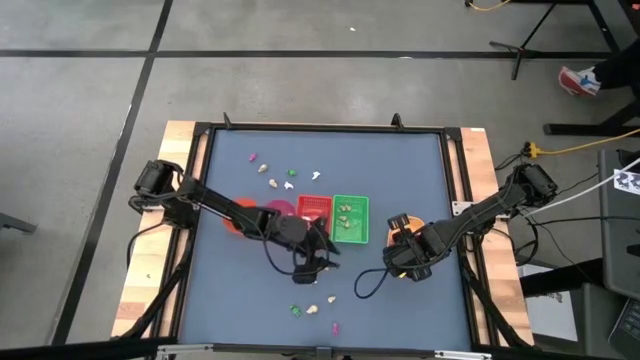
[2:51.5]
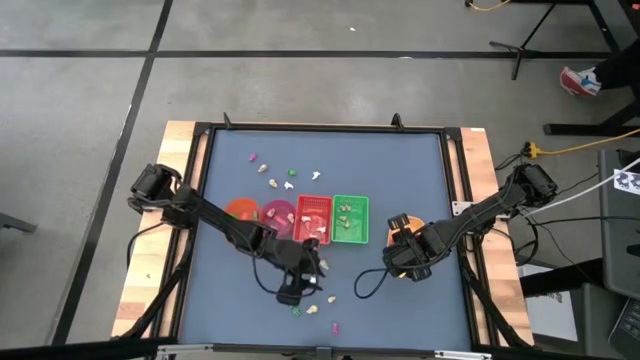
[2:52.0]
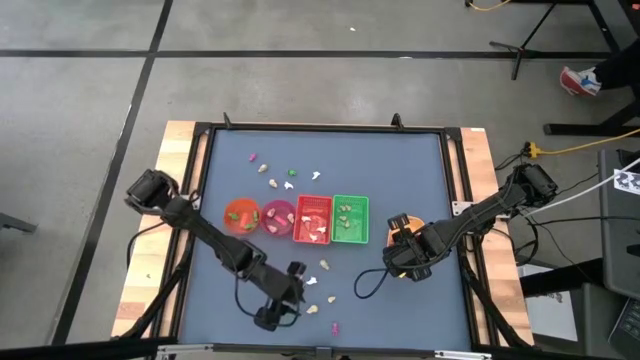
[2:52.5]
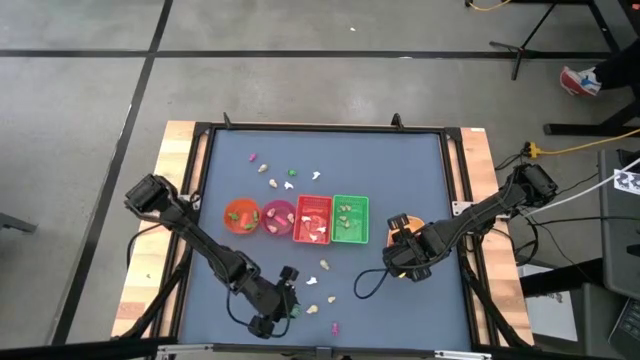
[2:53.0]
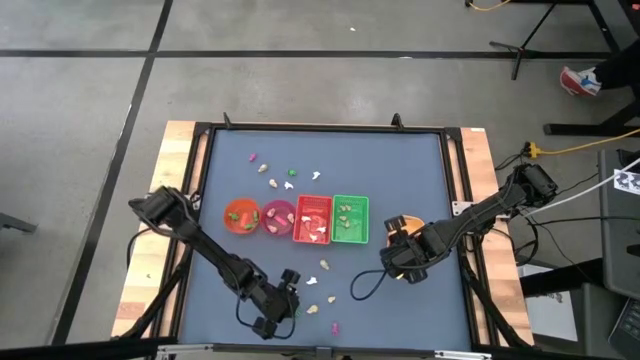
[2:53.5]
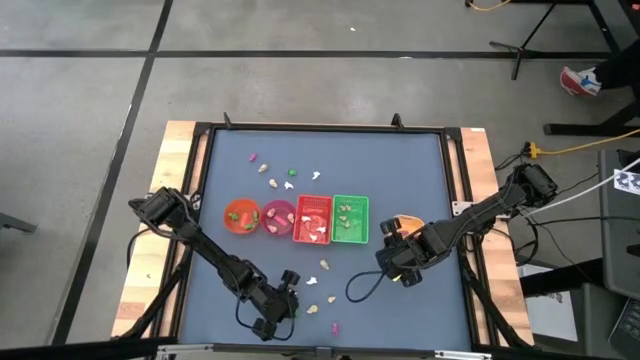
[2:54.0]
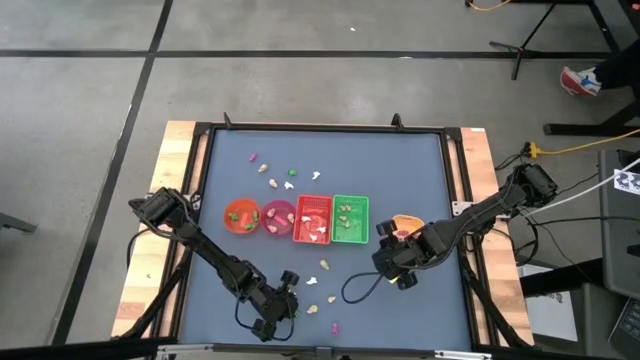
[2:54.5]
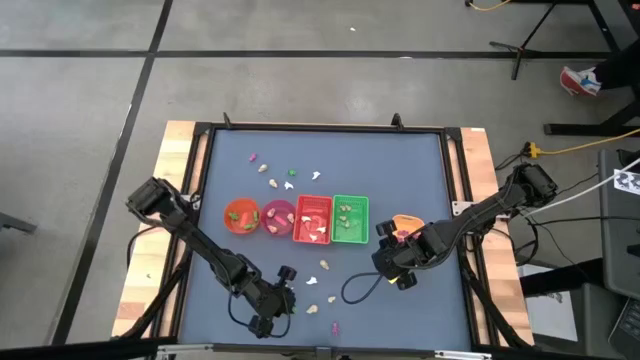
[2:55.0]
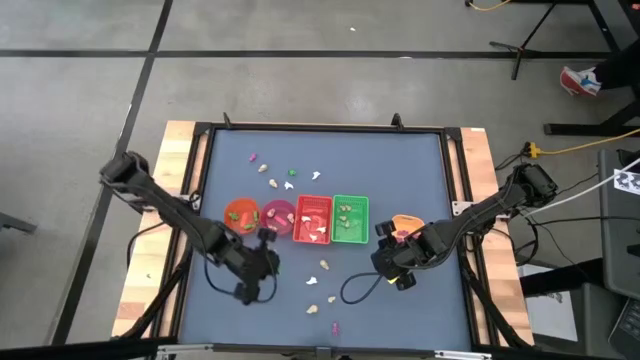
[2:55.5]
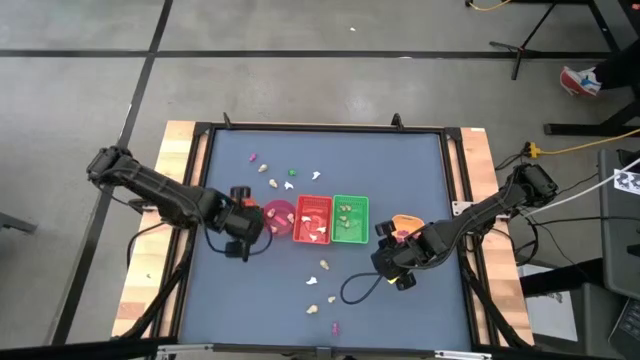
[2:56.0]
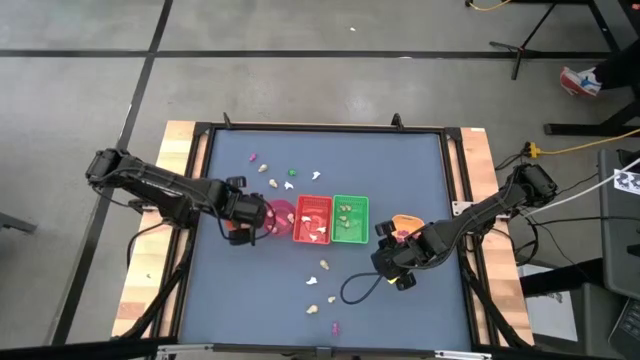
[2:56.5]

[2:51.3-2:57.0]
Task: Sort Halloween decoration
Put the green skeleton toy into the orange bowl

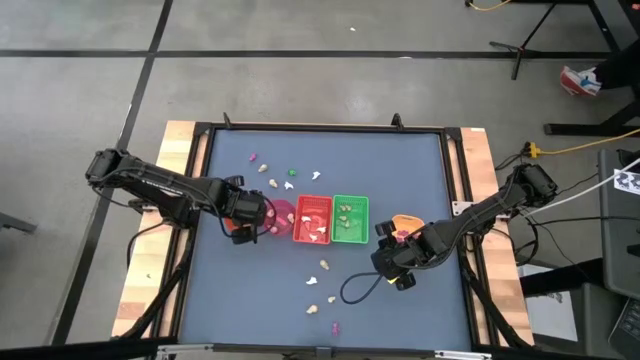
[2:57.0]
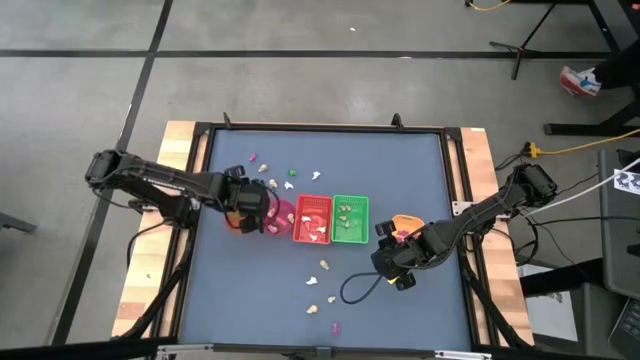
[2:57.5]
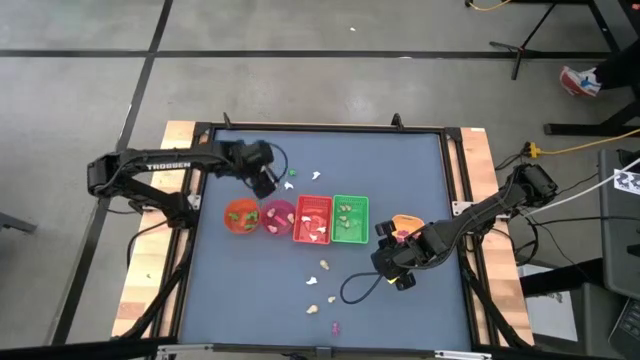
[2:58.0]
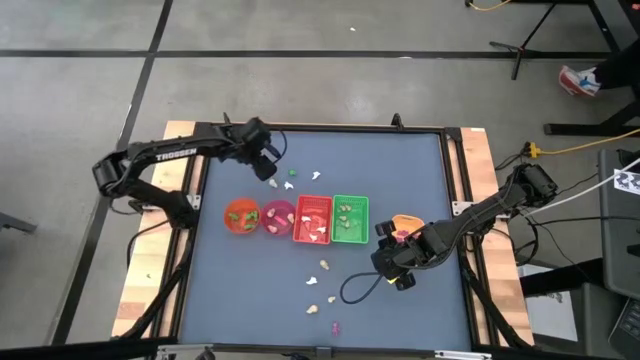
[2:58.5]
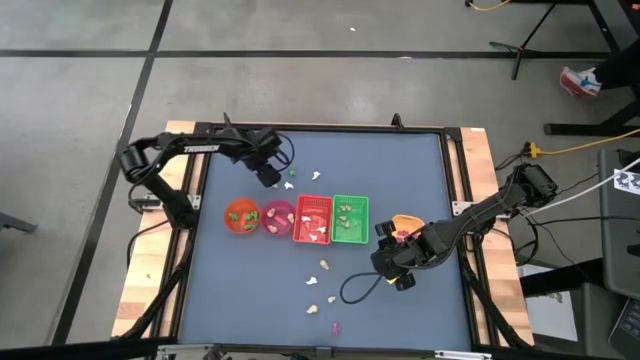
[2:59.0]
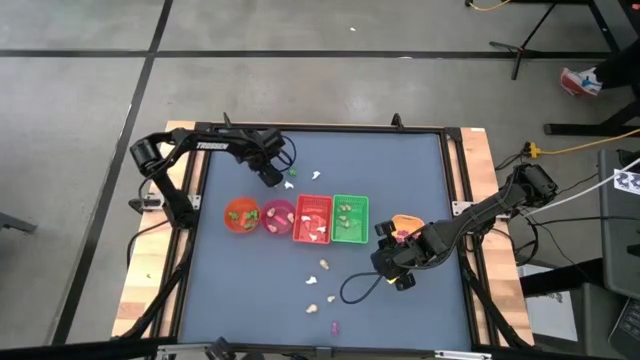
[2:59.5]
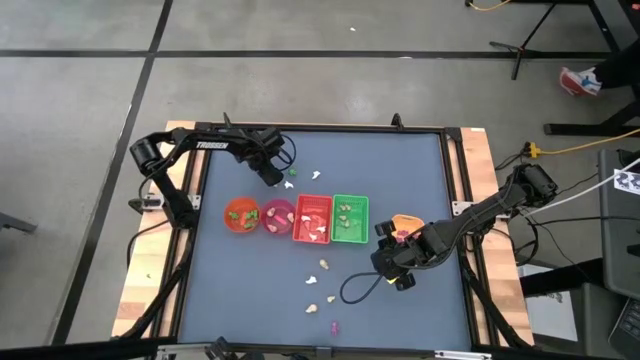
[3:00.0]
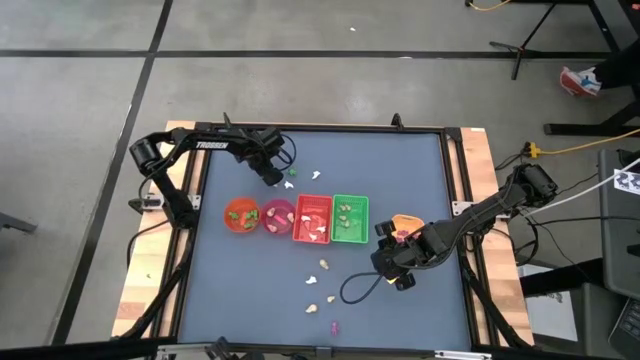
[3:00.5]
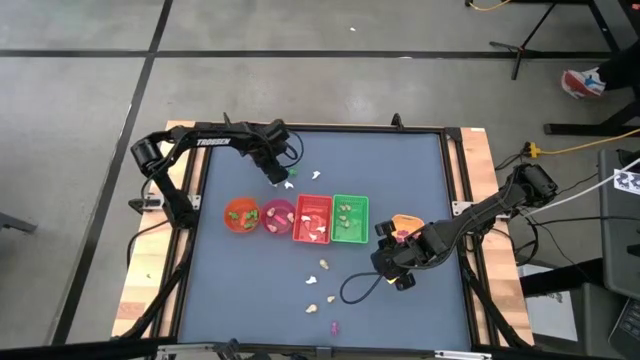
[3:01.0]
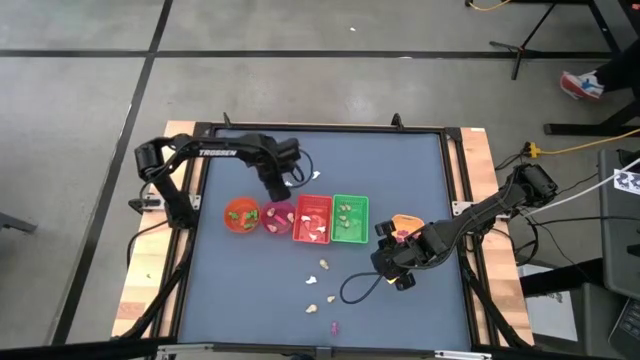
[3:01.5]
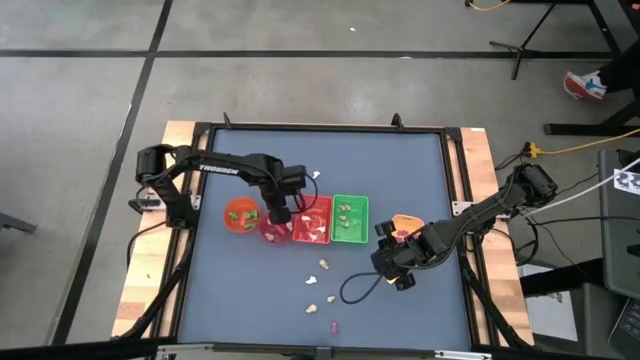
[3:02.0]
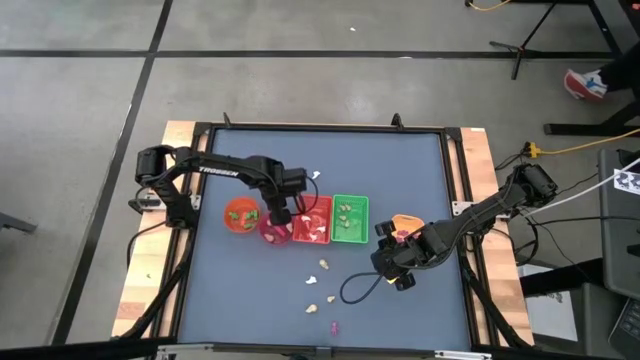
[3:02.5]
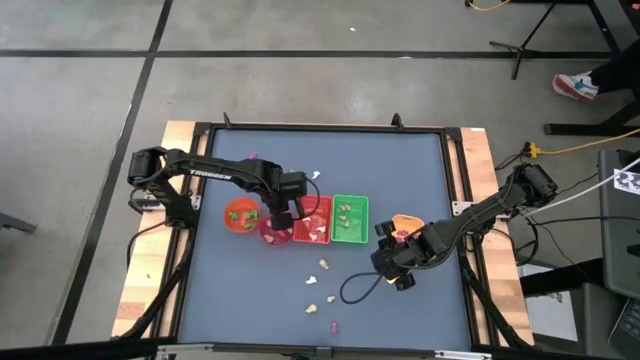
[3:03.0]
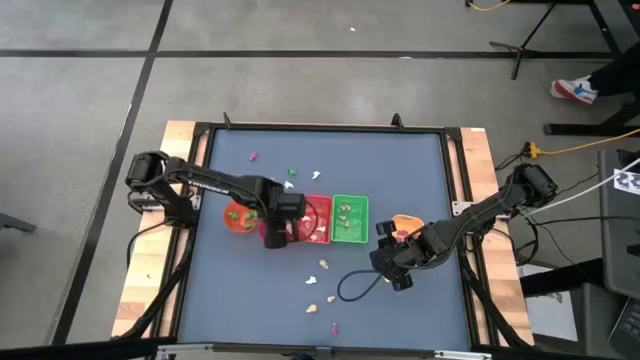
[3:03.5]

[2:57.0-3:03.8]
Put the yellow skull toy into the pink bowl

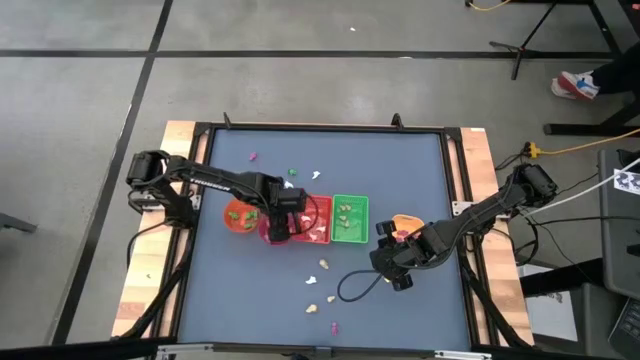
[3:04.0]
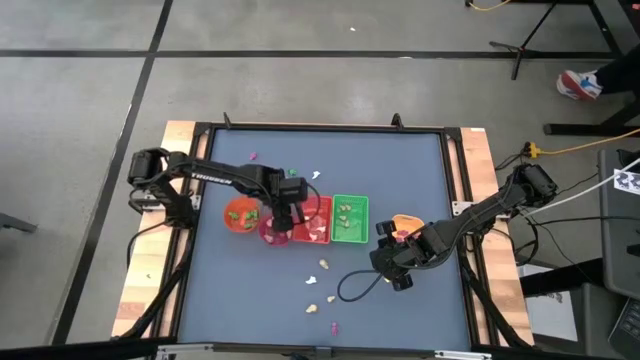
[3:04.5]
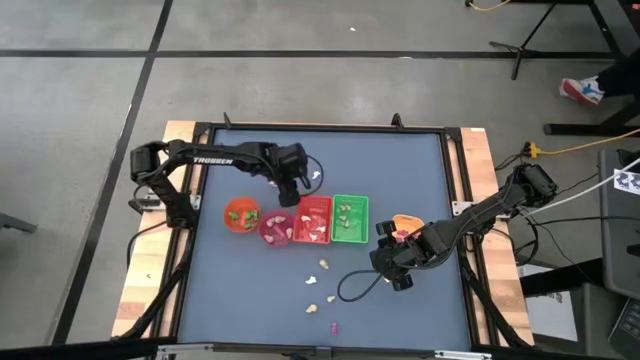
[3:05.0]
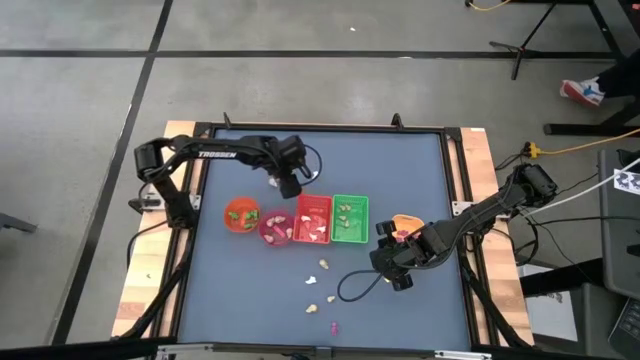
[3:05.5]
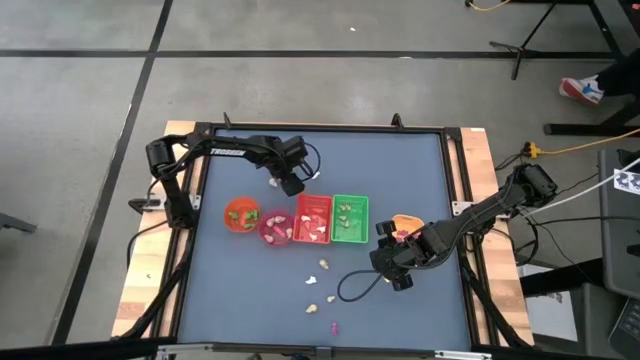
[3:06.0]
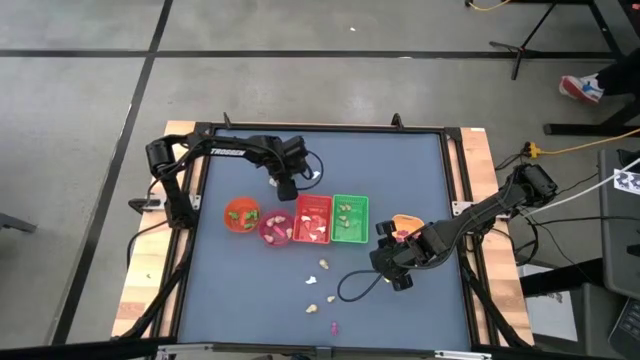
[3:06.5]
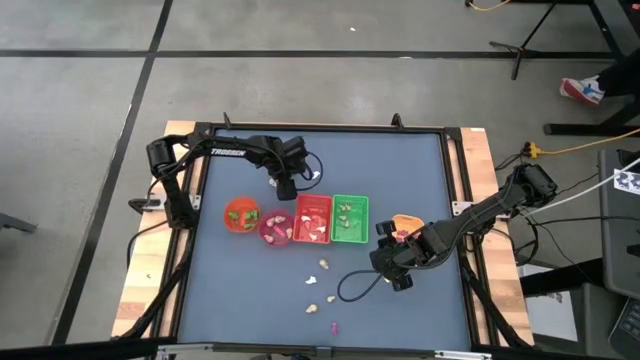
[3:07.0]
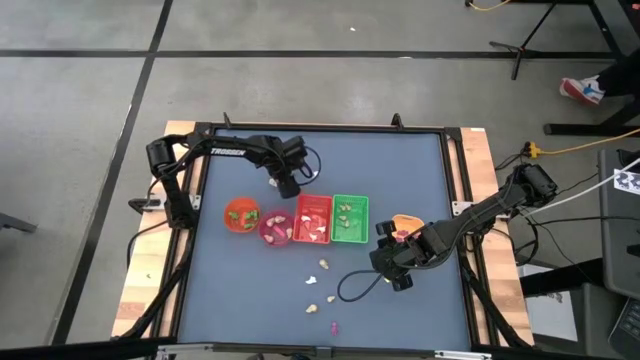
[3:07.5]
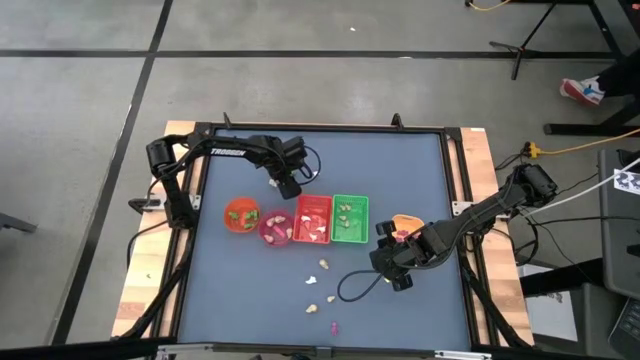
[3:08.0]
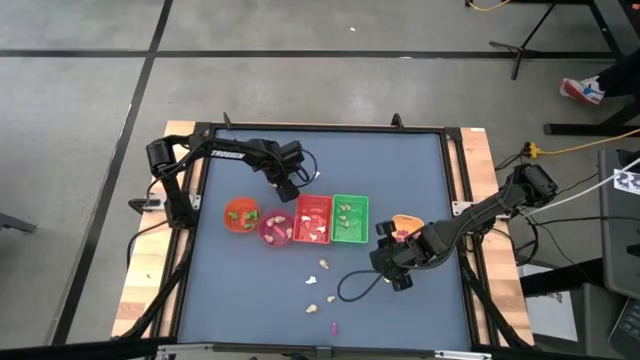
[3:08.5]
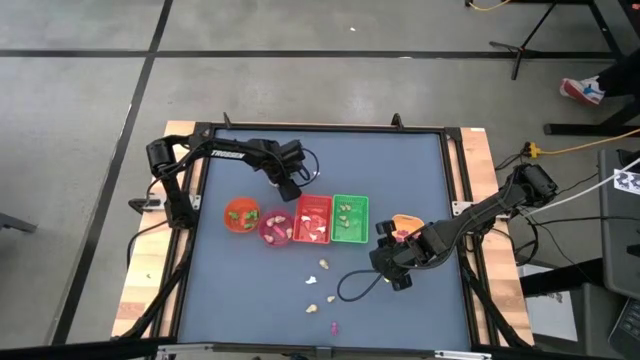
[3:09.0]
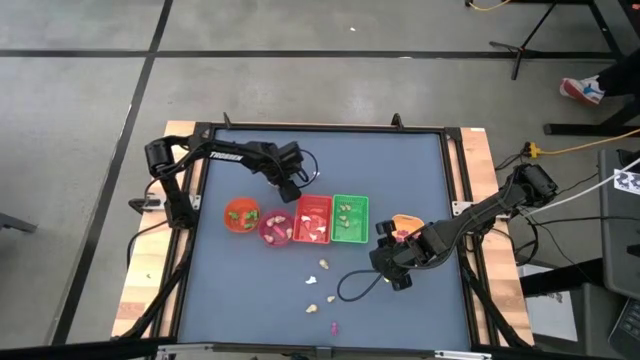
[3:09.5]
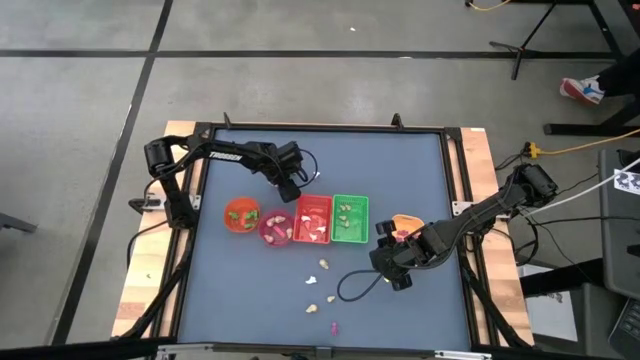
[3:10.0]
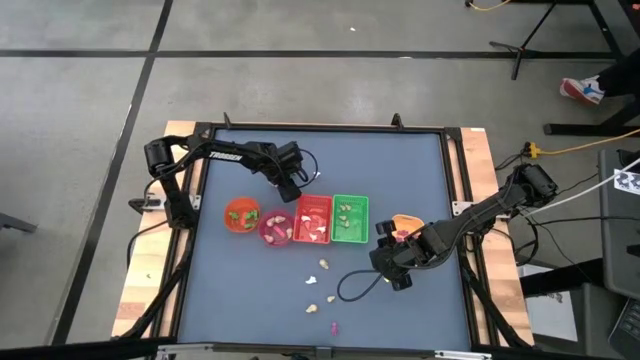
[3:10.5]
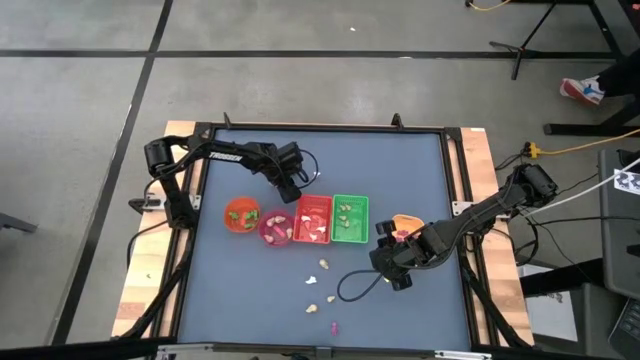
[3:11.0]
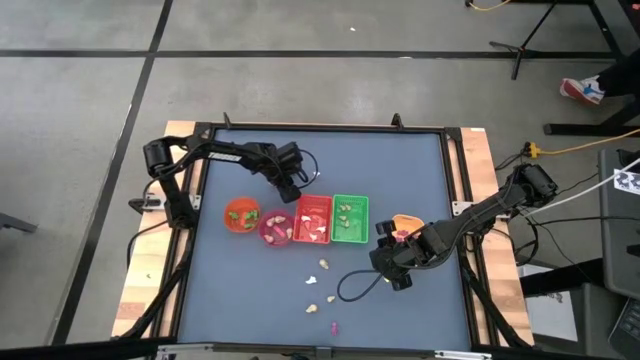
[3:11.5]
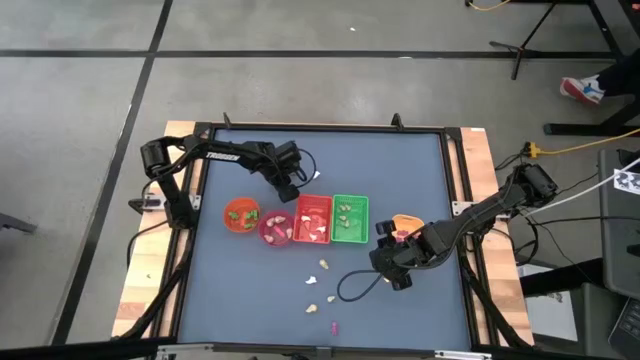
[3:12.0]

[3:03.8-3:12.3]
Put the white ghost toy into the red bin
